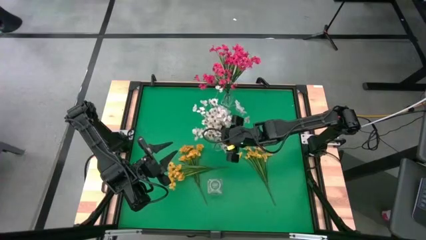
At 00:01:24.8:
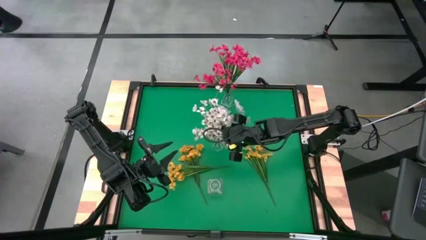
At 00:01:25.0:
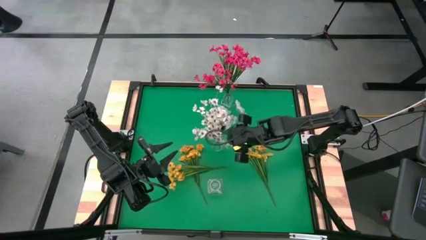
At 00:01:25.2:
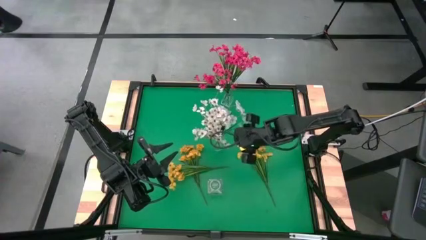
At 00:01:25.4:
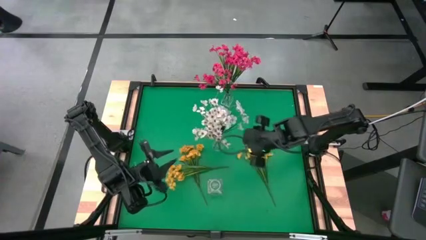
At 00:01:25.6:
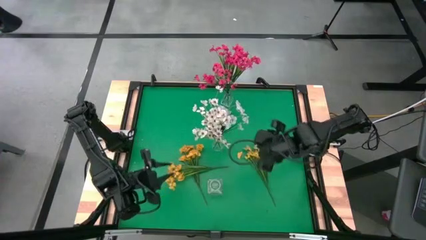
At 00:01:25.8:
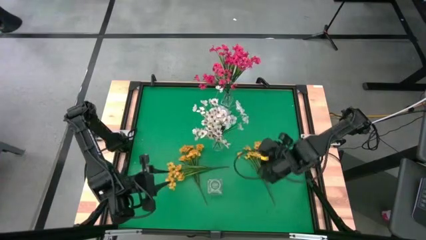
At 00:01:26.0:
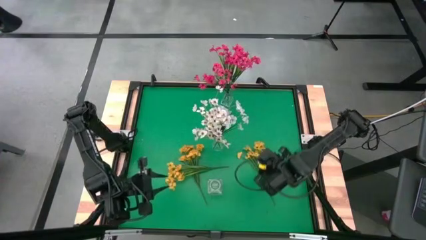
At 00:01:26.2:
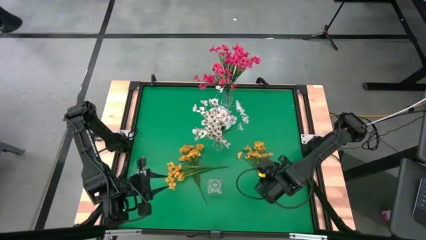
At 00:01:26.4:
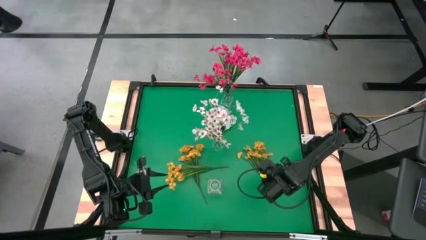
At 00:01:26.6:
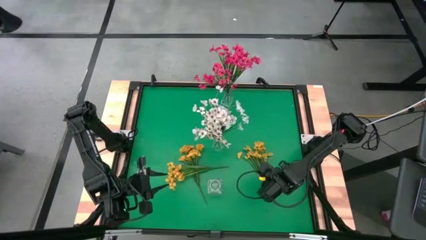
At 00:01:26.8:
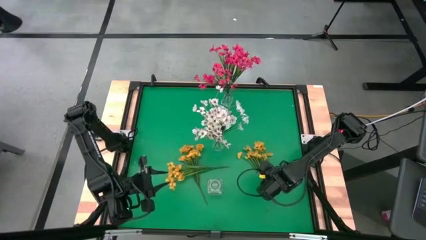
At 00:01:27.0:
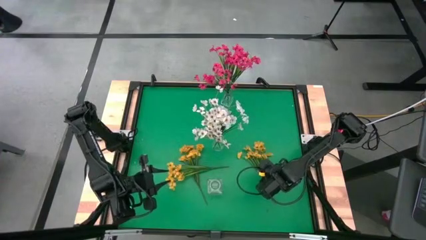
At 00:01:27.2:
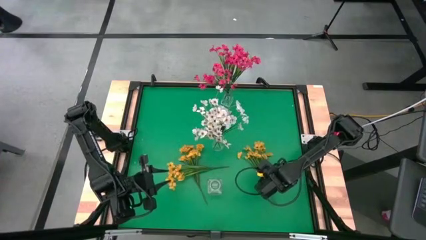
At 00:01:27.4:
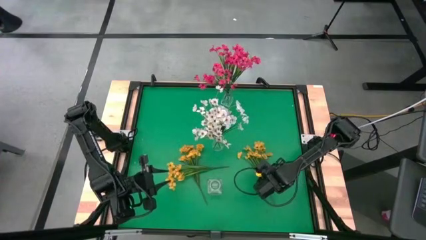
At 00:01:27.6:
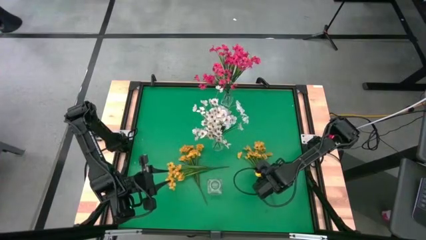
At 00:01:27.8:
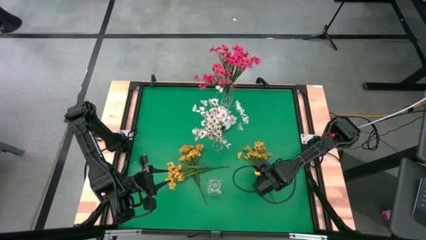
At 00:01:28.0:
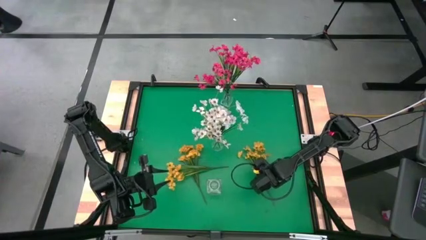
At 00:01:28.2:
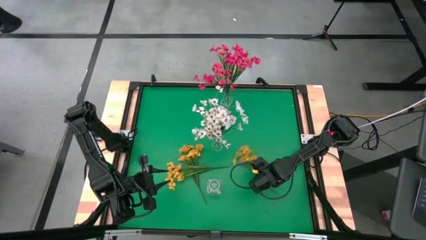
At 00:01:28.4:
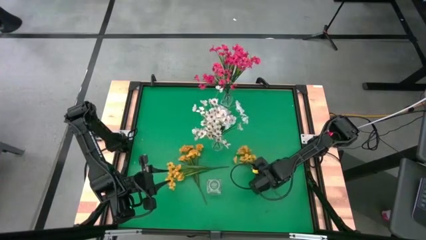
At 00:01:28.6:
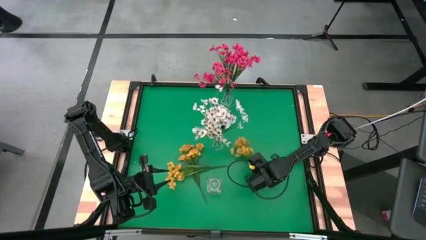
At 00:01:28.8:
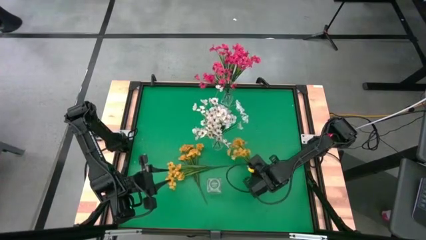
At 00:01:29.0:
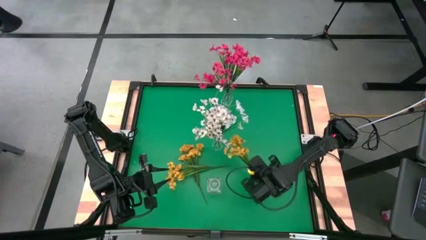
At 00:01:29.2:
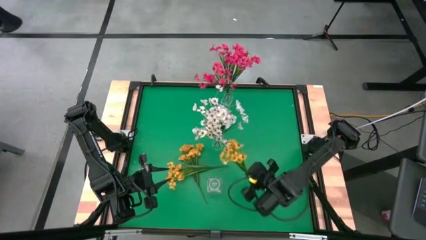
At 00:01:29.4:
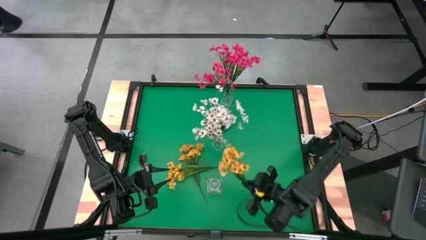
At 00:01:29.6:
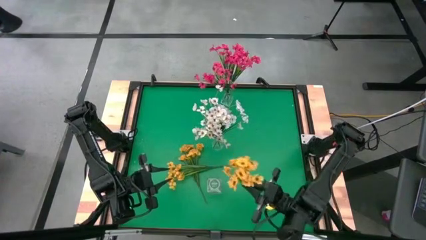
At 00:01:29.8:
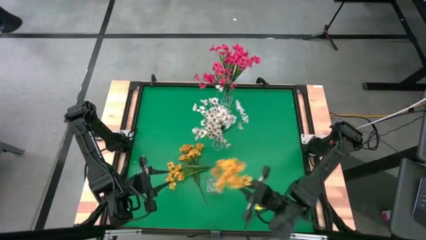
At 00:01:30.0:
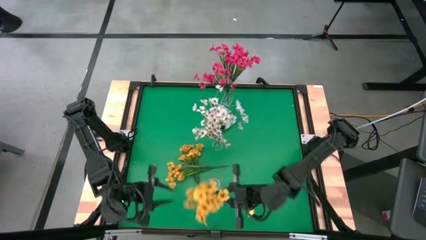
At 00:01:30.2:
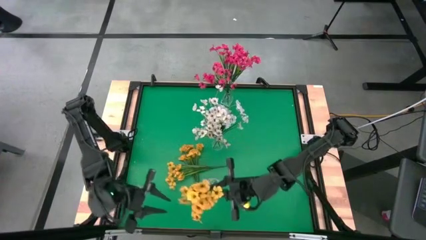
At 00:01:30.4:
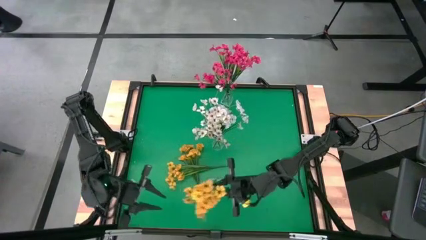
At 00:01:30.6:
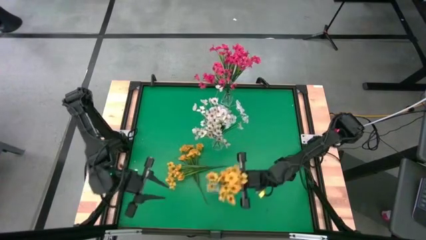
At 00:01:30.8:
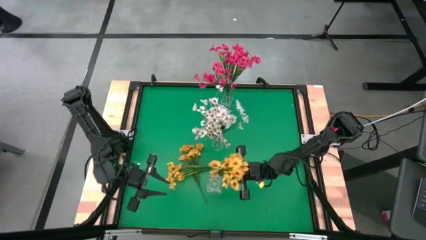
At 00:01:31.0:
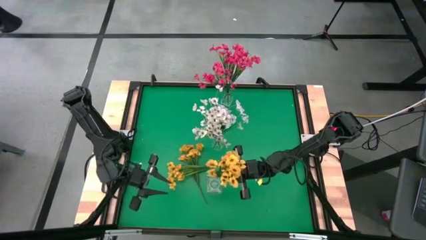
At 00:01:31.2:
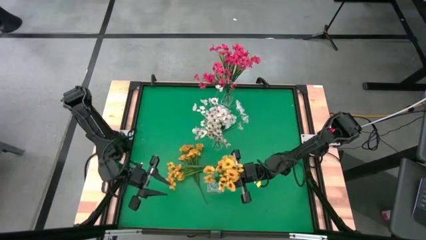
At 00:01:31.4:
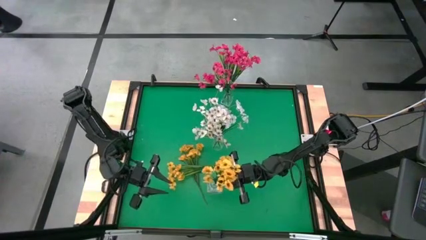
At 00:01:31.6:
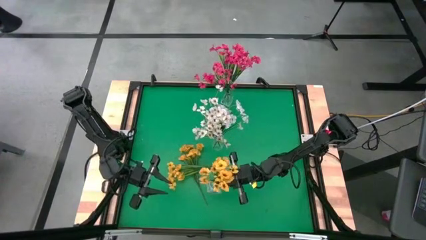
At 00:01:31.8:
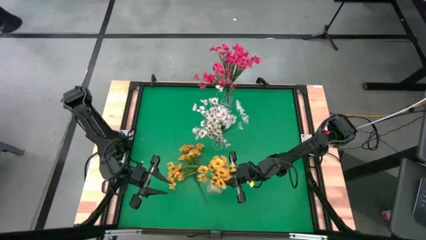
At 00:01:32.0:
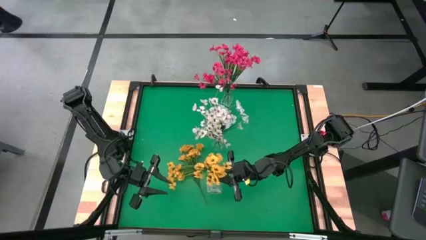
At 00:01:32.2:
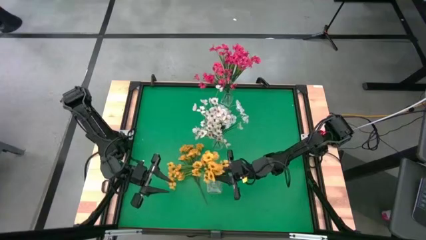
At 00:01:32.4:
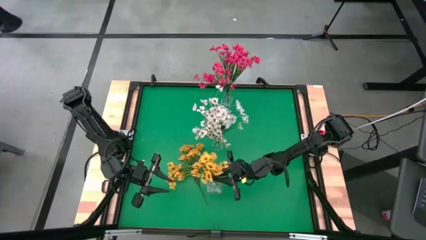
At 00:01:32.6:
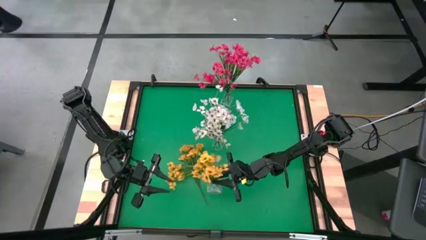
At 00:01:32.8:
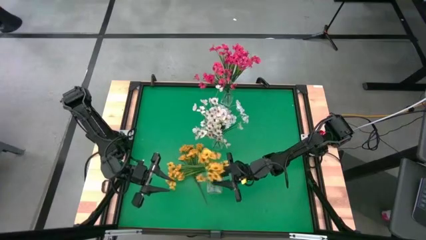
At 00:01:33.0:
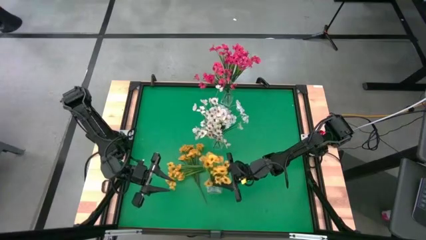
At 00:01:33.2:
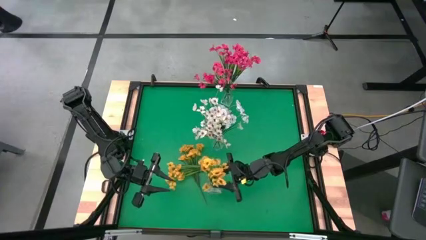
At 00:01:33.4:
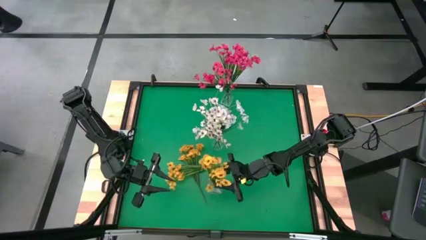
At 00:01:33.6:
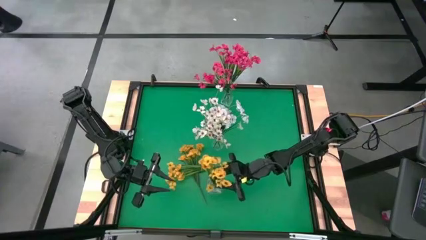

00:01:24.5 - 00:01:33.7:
Task: Sort flowers into vase by color
Put the right yellow flowers into the bottom transparent vase

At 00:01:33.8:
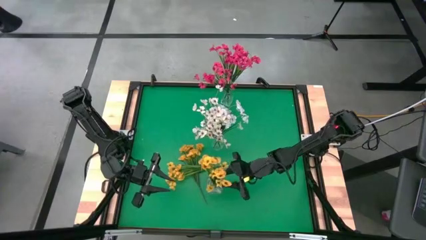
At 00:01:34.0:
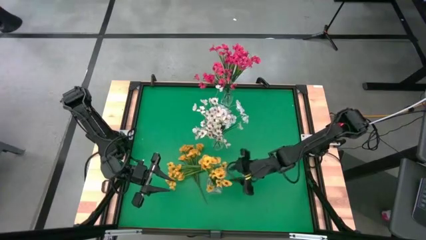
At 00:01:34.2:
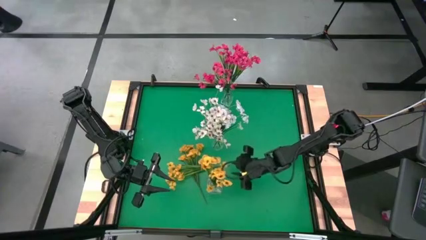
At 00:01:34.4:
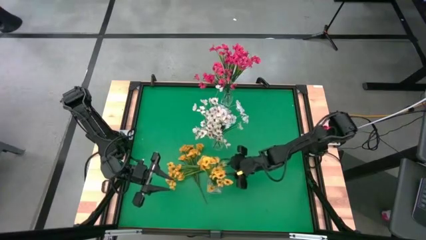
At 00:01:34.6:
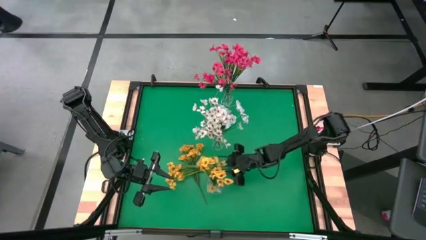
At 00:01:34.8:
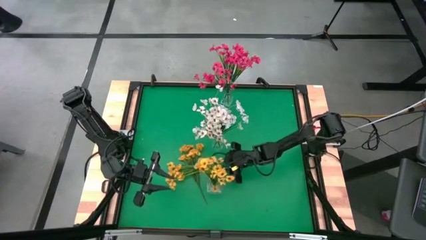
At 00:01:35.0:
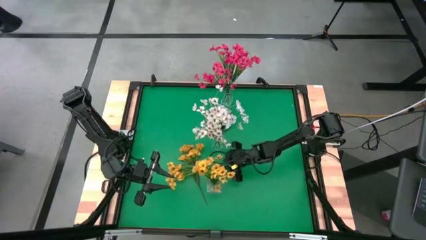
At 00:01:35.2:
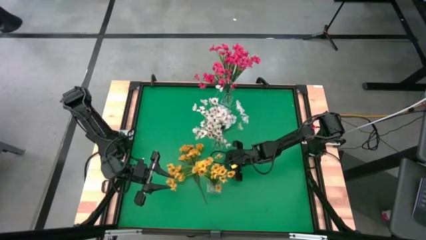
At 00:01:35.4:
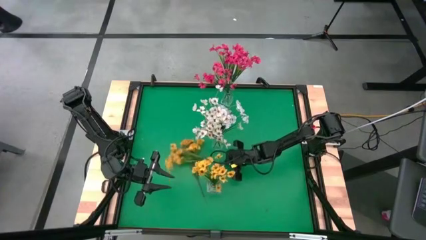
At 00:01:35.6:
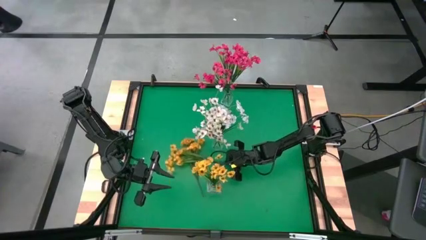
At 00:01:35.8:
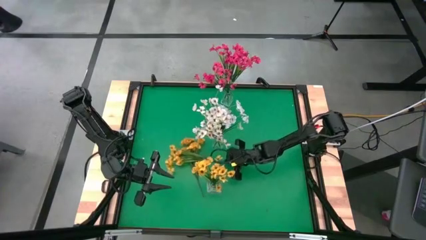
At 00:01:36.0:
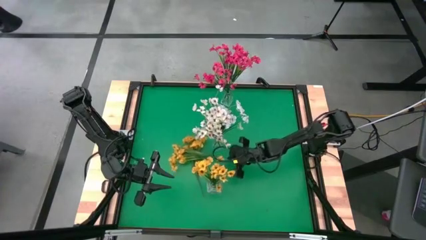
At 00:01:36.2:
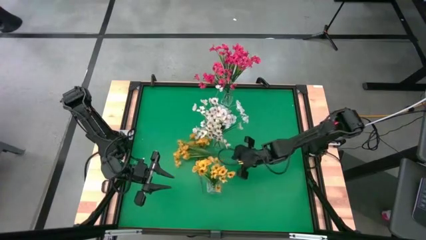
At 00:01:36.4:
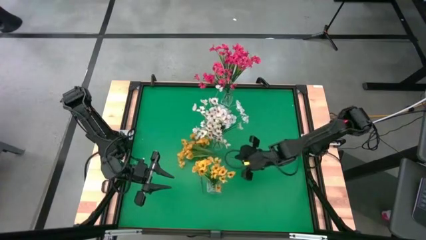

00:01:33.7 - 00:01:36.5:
Put the bottom yellow flowers into the bottom transparent vase

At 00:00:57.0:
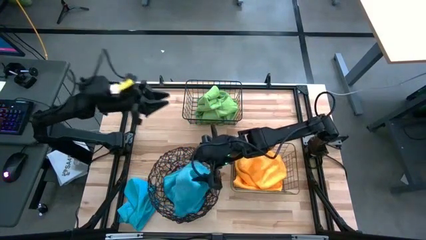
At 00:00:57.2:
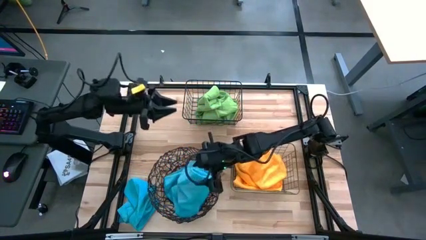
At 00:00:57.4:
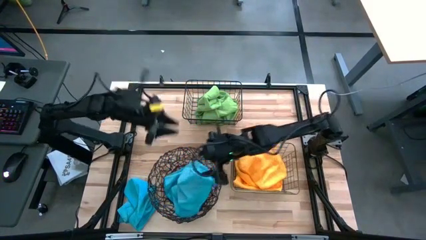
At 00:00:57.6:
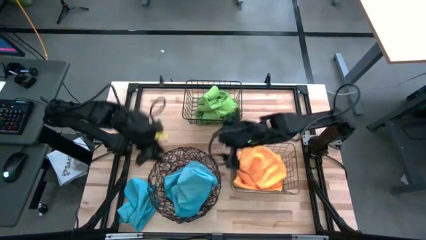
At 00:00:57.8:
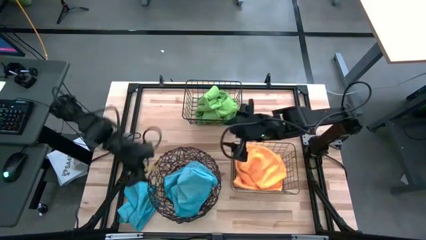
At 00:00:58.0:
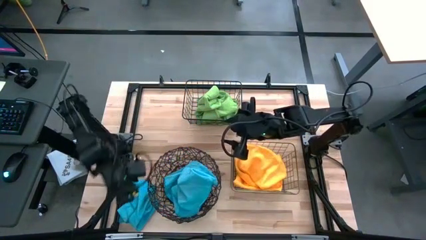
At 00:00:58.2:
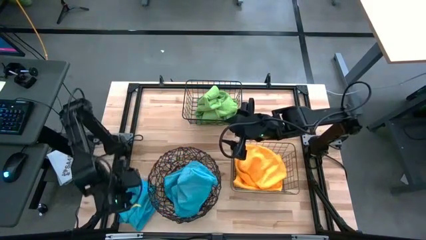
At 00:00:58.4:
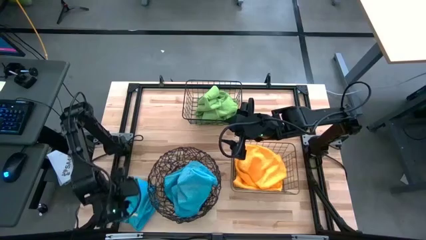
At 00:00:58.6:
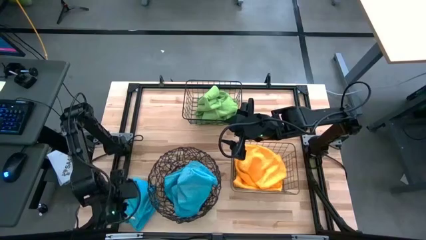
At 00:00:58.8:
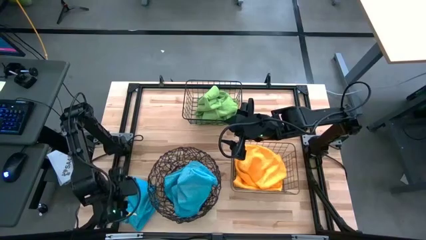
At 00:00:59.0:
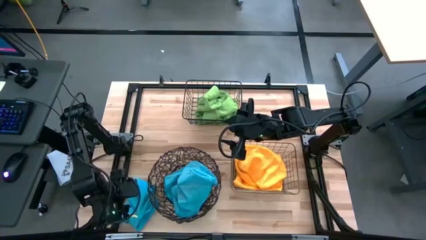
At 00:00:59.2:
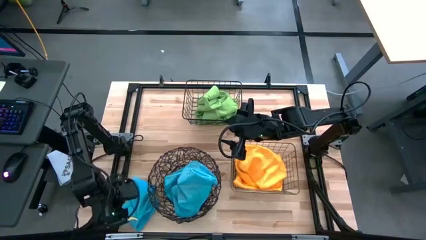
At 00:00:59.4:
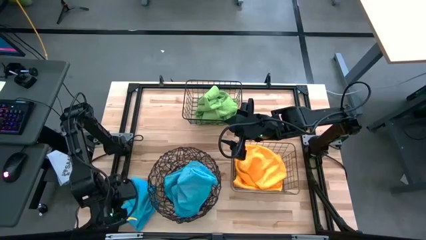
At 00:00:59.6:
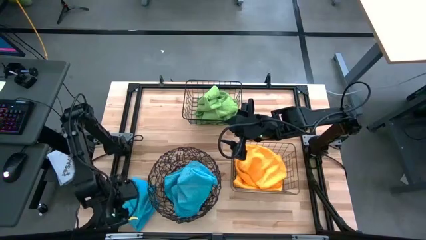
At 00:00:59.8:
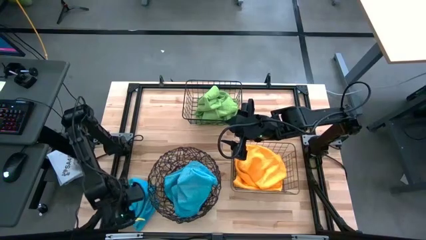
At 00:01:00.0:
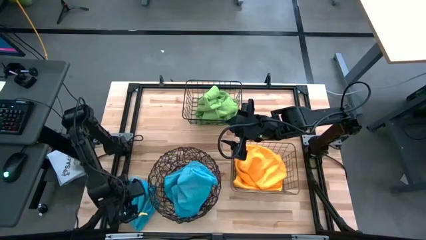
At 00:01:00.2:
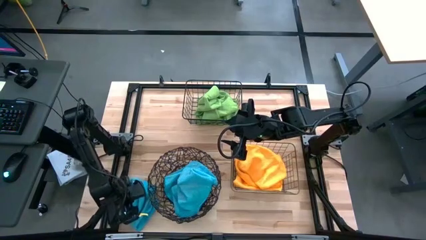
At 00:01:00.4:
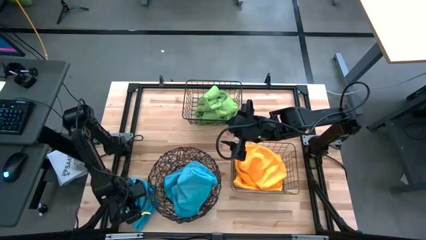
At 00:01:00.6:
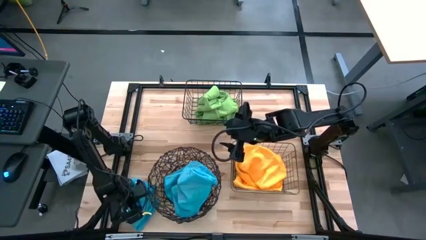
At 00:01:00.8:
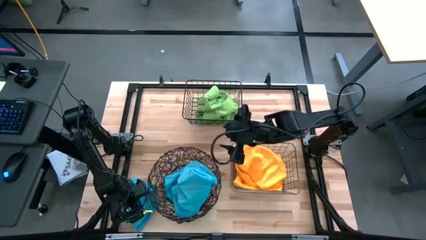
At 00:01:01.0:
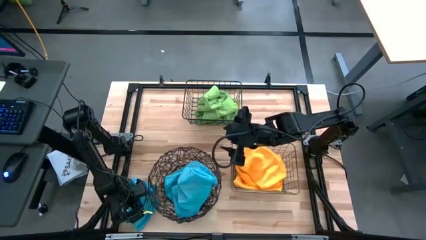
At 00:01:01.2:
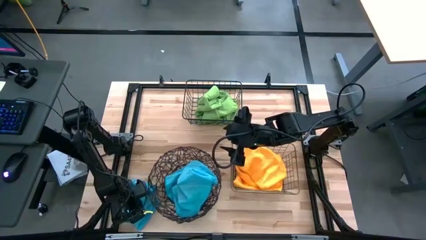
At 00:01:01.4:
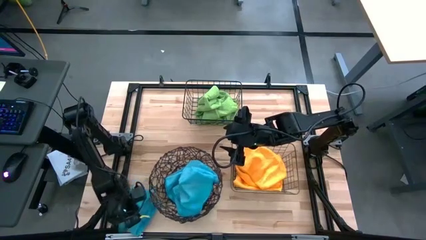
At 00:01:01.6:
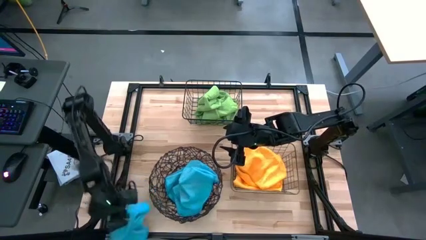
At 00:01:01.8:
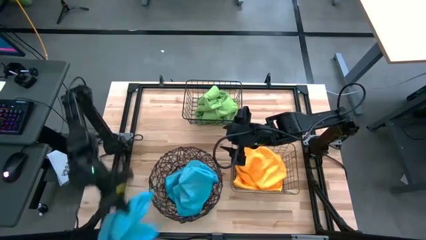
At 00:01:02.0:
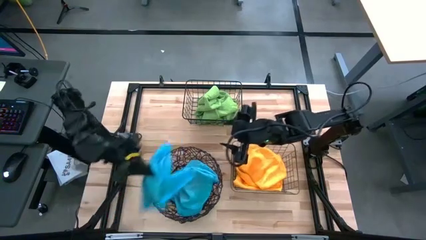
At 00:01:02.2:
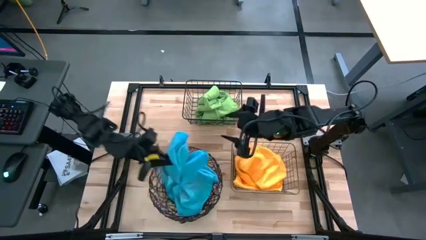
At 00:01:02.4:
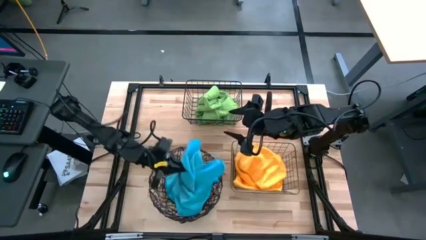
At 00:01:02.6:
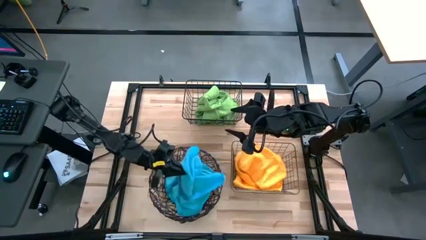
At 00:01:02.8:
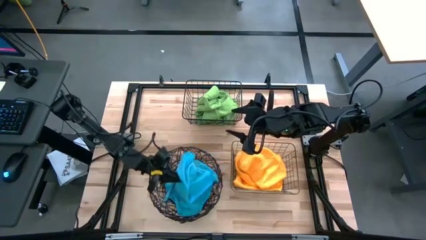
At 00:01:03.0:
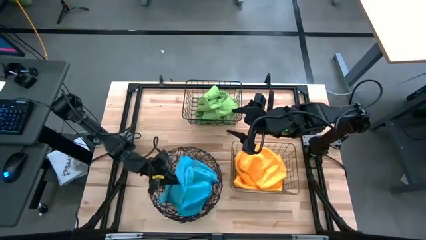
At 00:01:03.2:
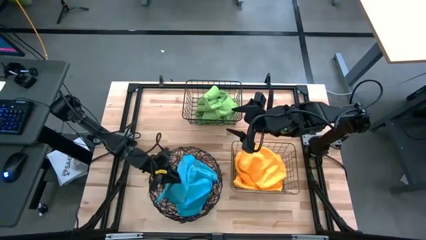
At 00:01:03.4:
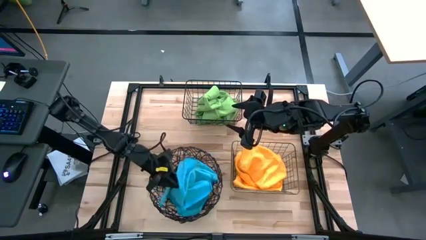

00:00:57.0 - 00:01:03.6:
Task: Sort microfiber towel by color & place in baskets
Put the blue towel into the bottom wire basket
